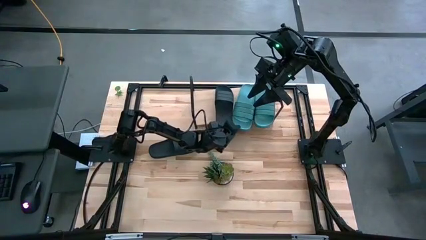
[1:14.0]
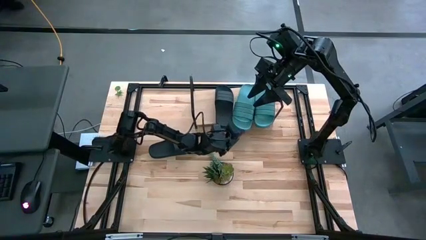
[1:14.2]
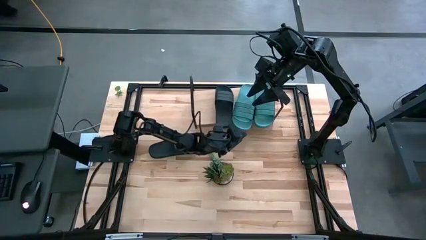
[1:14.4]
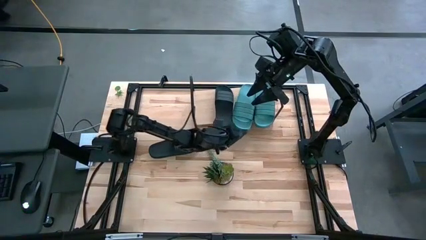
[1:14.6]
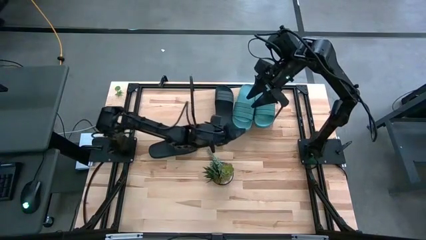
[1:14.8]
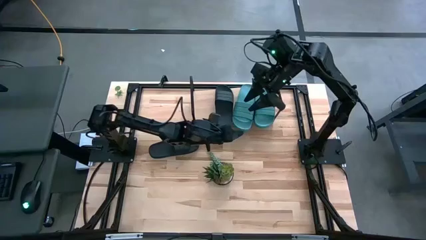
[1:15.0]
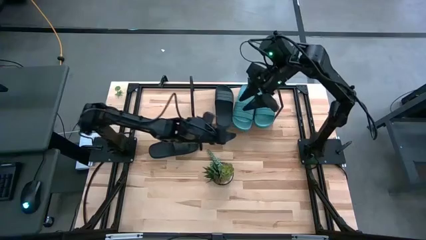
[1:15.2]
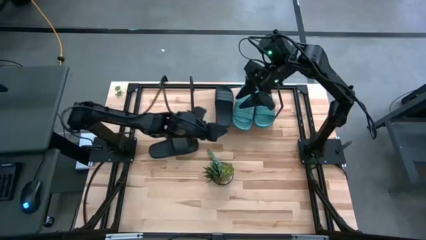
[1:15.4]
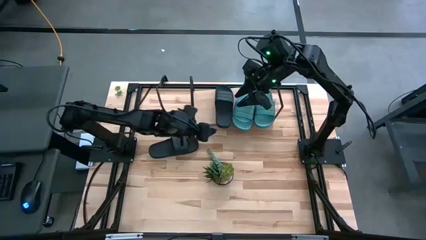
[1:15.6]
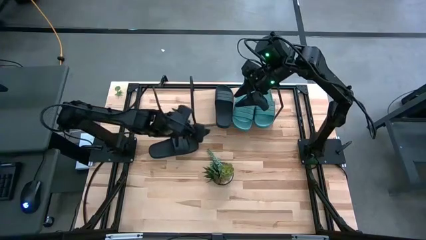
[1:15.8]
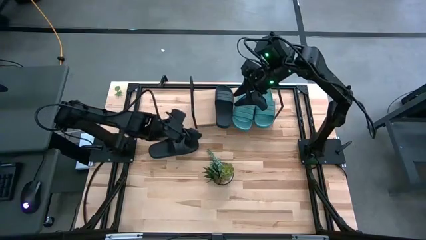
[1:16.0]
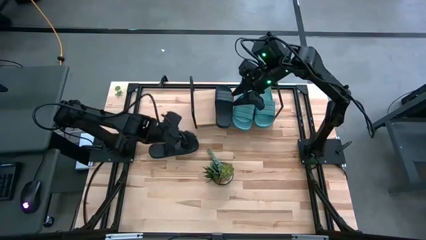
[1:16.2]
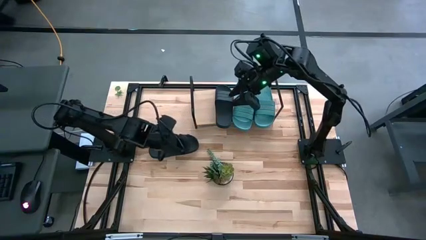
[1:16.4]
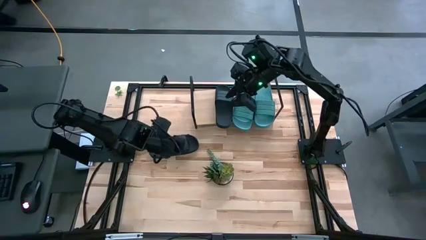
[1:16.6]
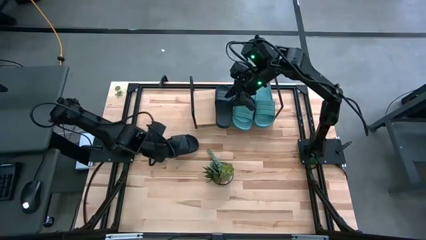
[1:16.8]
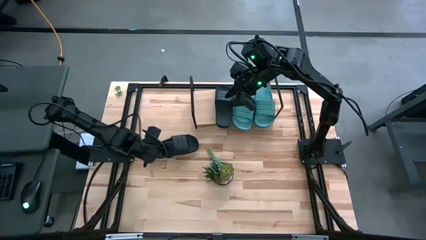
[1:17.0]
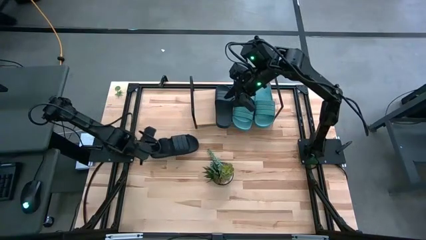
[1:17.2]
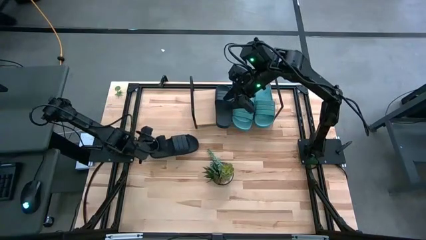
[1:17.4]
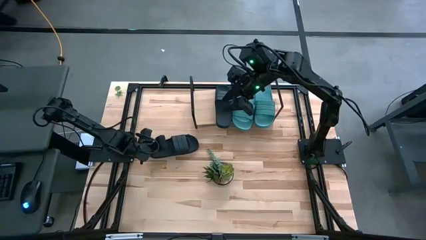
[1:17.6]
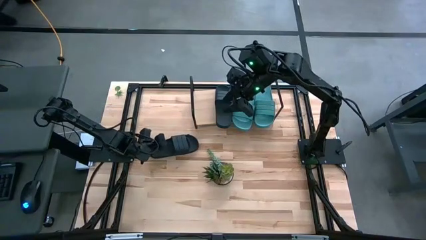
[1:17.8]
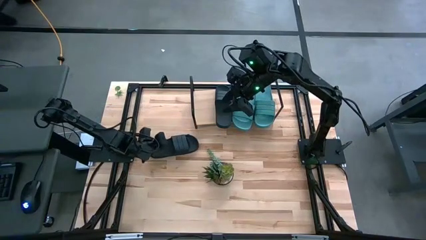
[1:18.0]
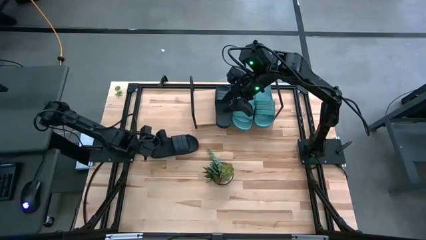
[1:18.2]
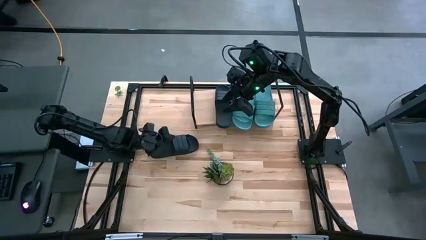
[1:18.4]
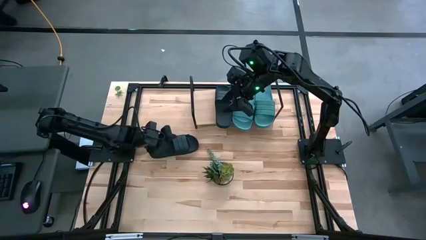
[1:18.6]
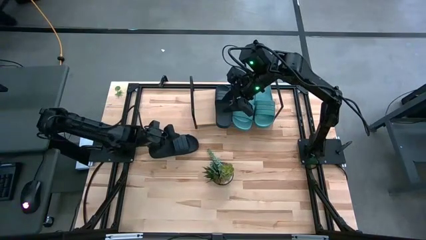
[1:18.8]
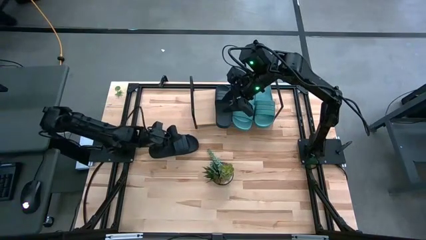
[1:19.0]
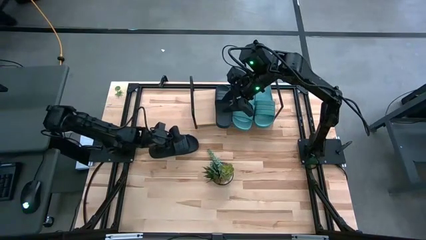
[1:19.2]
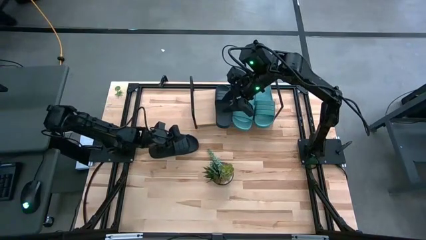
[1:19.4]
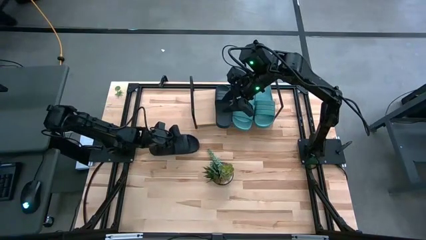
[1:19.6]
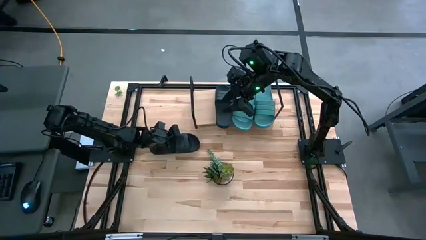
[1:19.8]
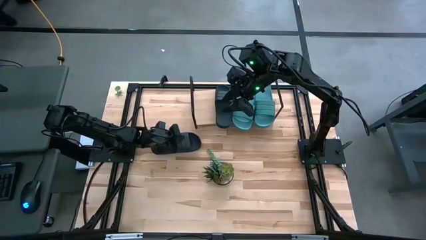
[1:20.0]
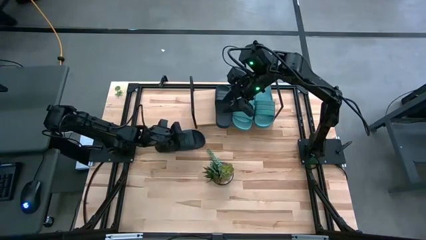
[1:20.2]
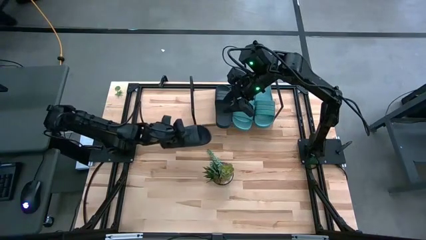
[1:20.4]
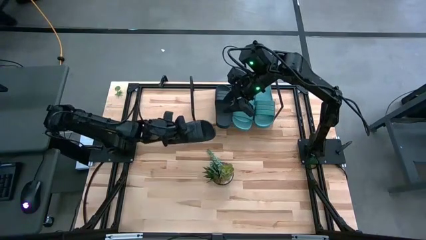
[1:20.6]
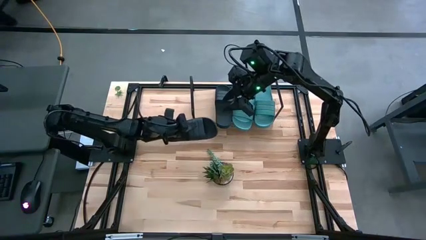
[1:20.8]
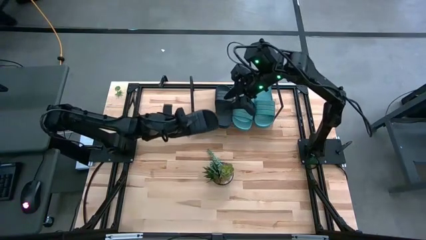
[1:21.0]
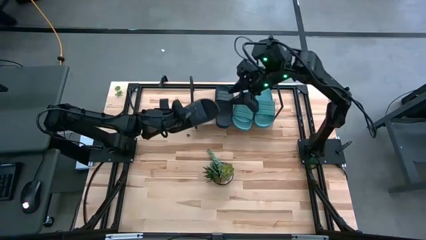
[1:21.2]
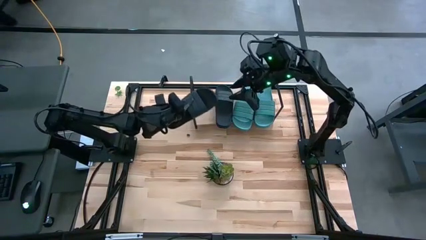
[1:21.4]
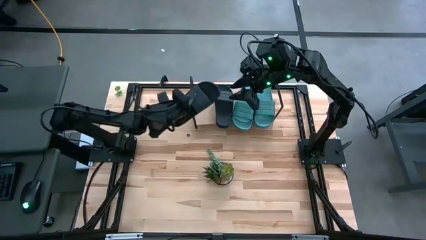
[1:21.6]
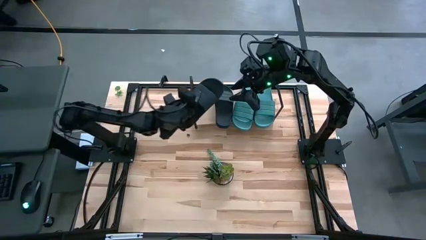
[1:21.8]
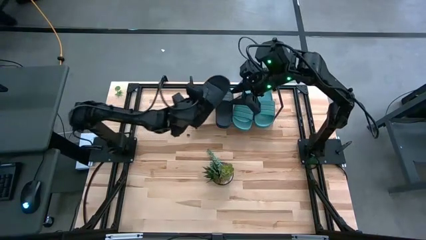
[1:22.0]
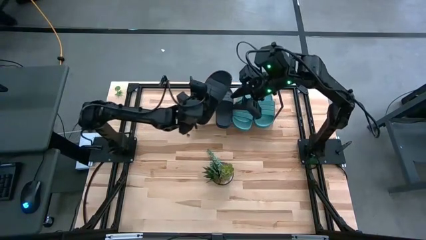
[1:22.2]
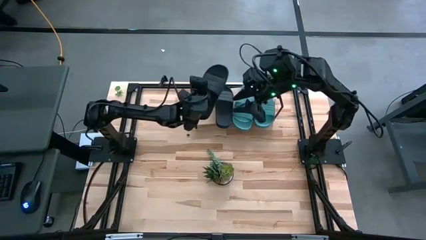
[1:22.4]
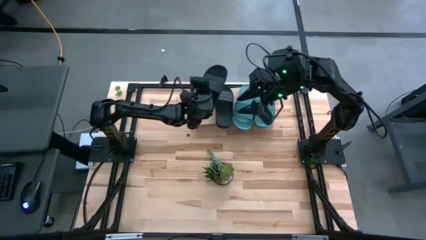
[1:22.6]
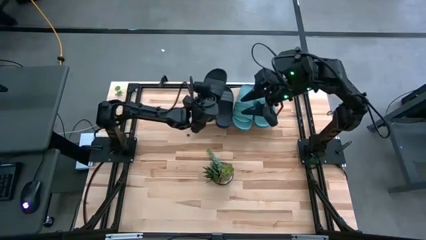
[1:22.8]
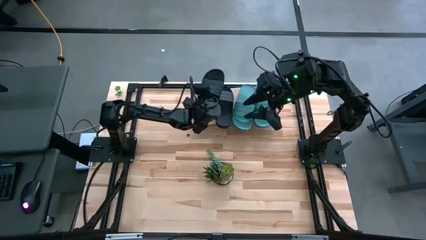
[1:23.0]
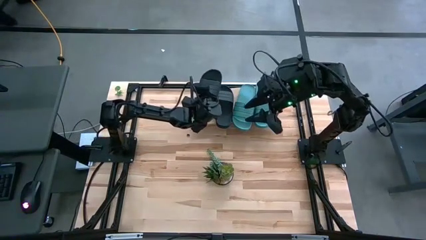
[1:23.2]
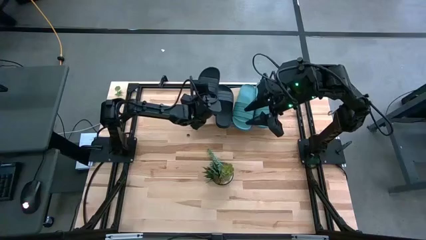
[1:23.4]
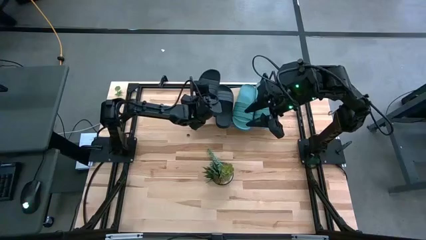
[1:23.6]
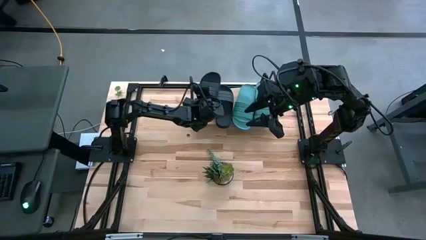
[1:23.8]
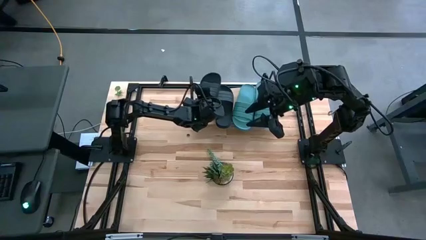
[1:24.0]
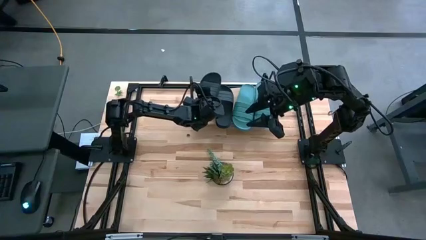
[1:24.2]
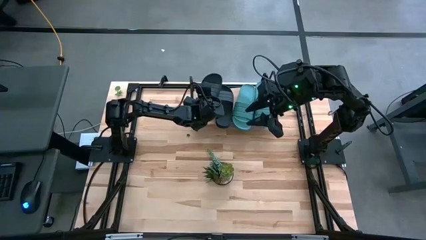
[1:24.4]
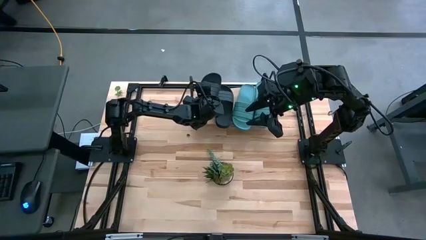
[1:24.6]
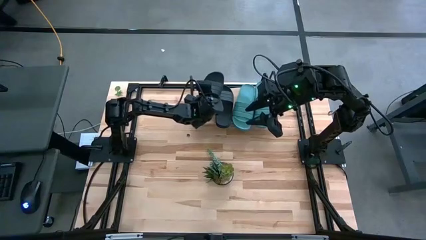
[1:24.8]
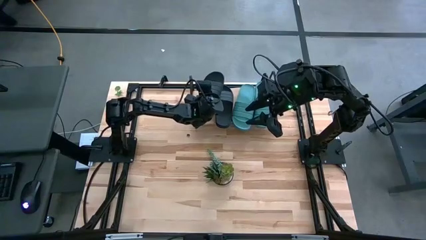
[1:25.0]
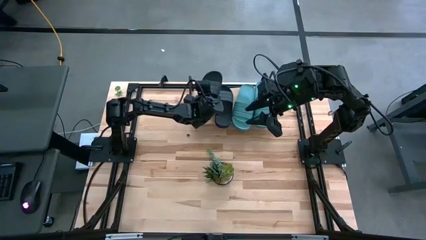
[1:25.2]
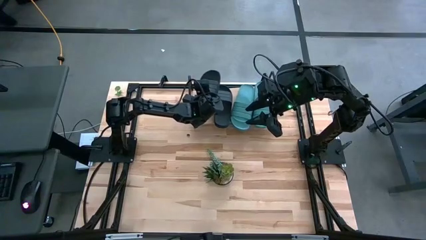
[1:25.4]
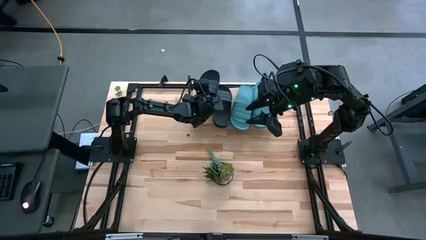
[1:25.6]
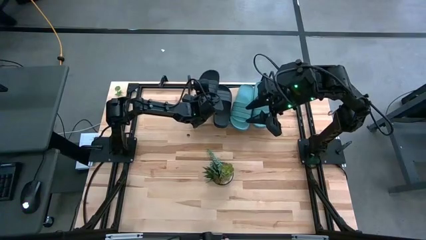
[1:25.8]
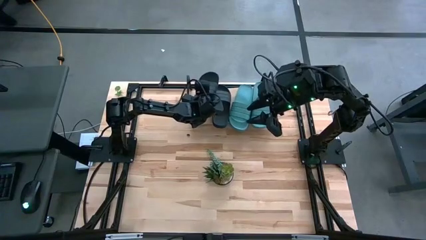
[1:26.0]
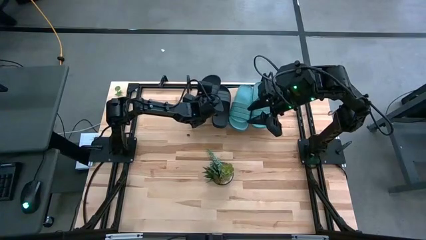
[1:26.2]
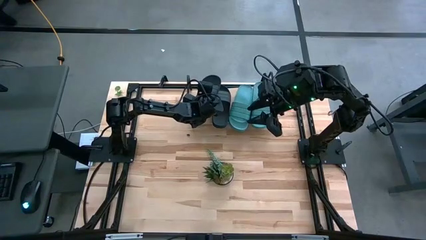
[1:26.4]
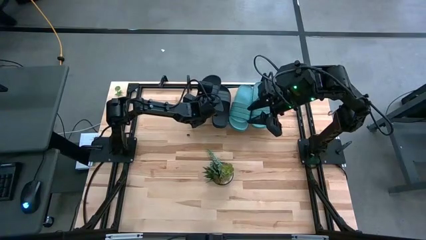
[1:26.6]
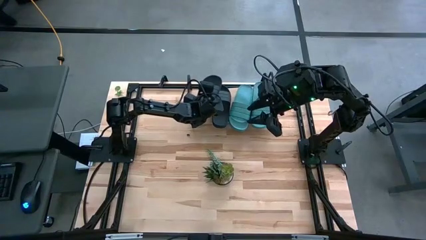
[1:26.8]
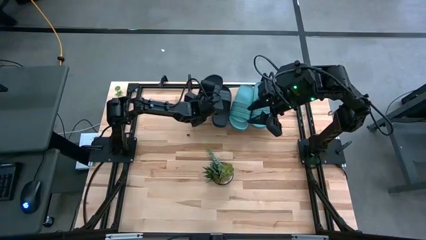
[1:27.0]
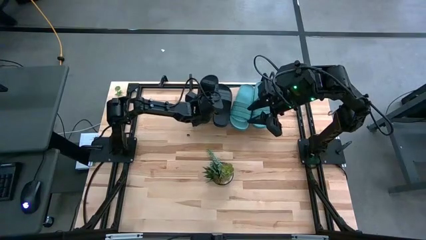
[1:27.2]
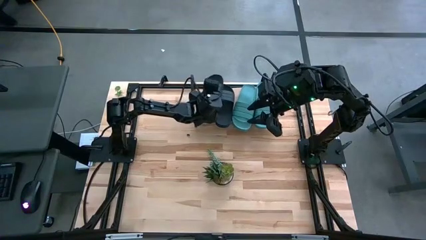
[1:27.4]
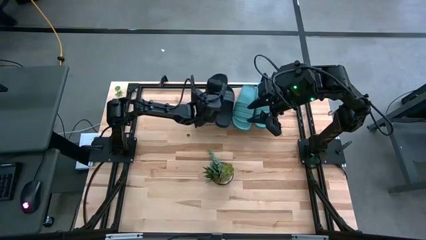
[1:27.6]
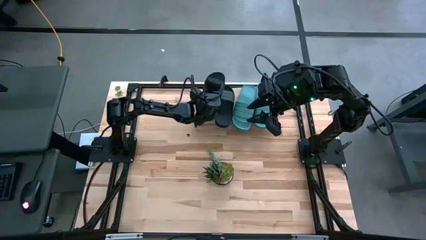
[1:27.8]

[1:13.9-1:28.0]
Task: Pick and place slides into the shelf
Put the black slipper on the shelf

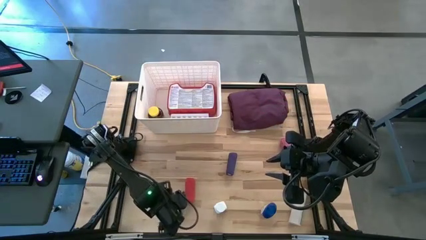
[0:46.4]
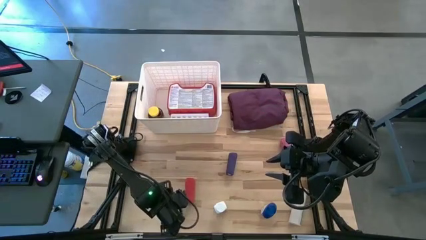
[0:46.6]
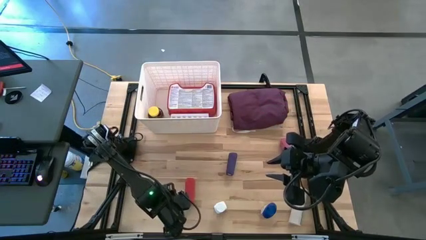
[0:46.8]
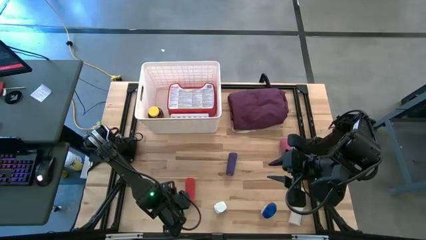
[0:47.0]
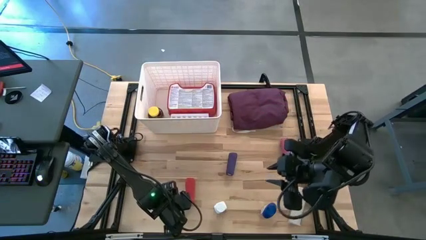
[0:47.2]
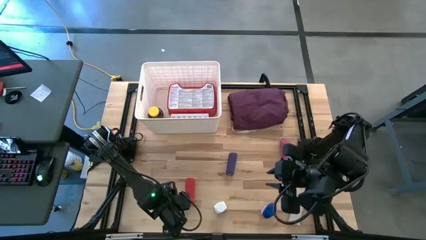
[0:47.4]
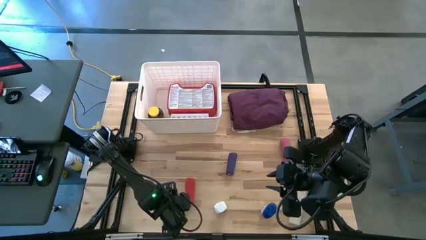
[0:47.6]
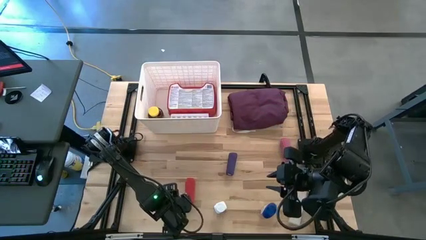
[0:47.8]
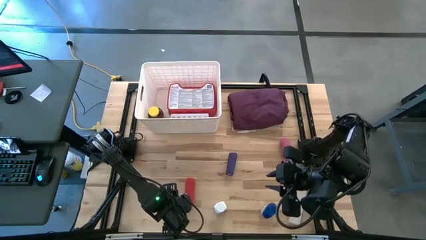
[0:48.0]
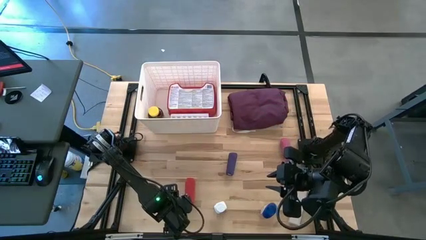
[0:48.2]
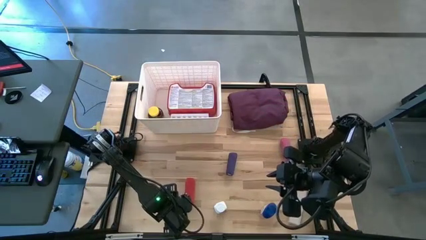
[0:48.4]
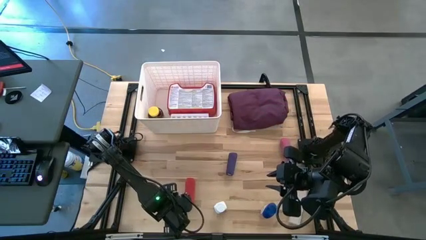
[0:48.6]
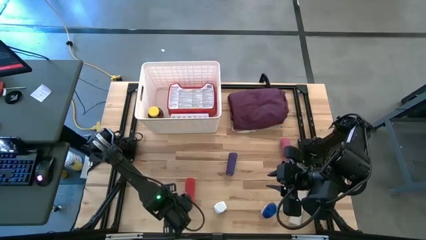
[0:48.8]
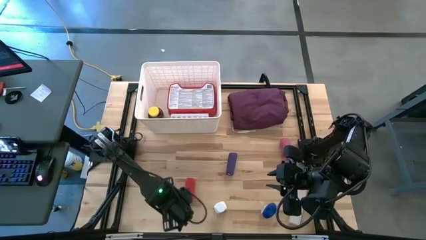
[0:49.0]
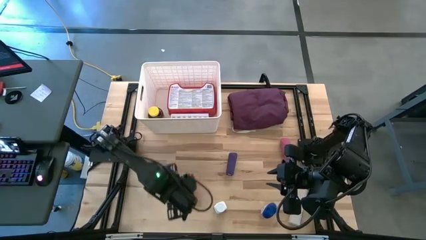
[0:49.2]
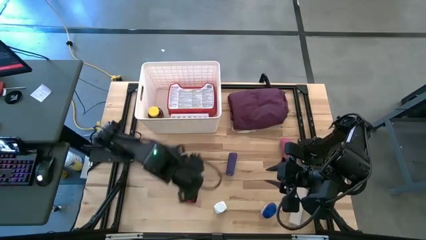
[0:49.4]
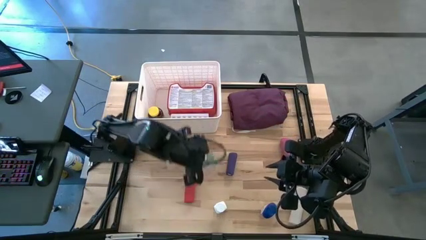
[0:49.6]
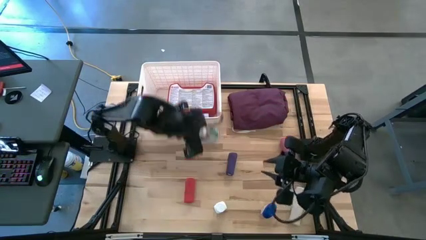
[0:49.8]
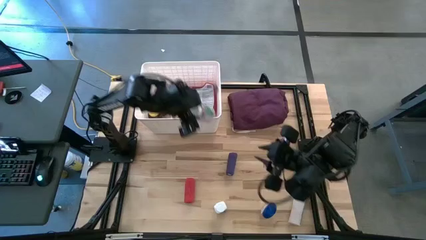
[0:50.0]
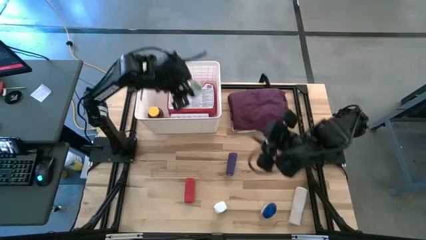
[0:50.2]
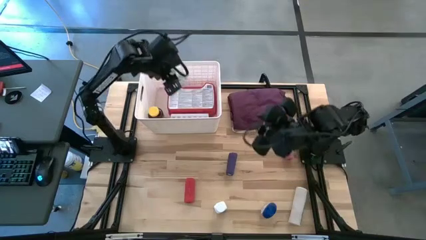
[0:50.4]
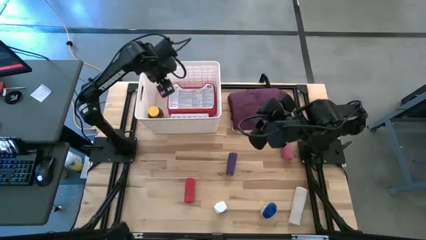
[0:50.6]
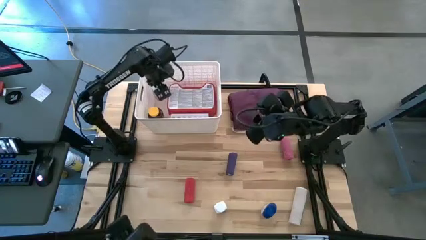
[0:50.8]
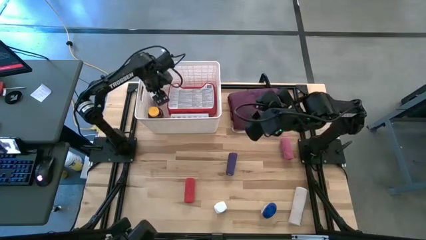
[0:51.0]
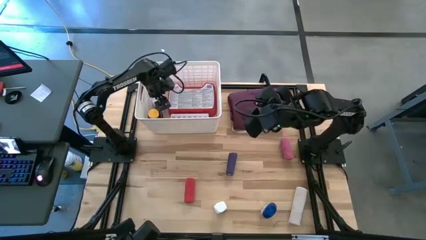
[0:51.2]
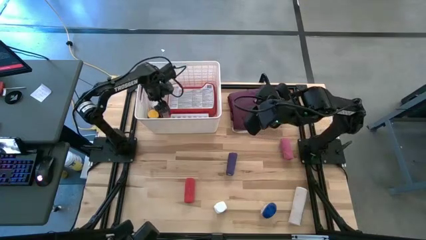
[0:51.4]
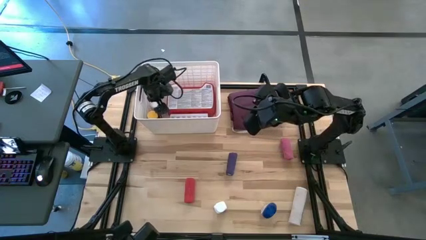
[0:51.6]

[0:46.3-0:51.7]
Task: Pick & place medical supplies in basket/bin
Put the green pill bottle into the white bin
